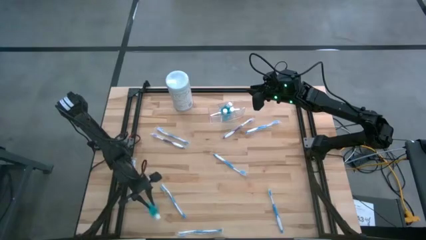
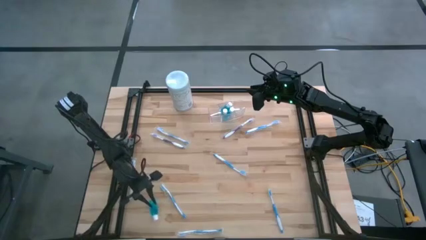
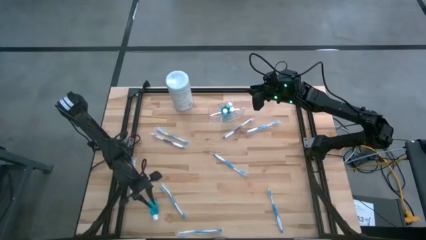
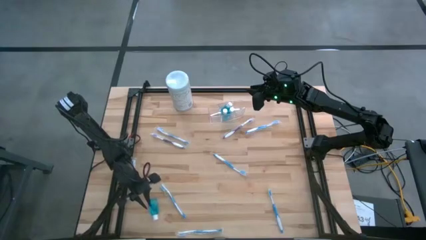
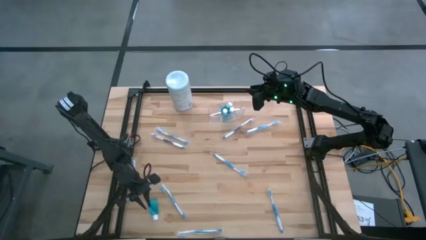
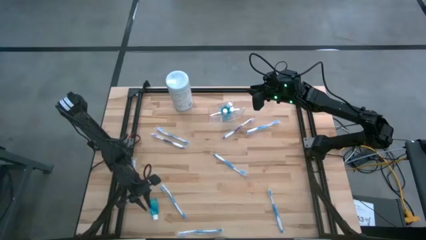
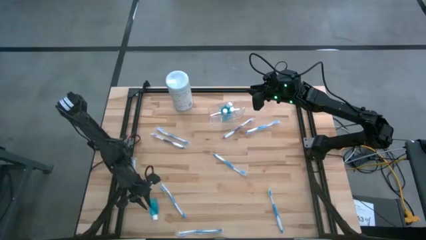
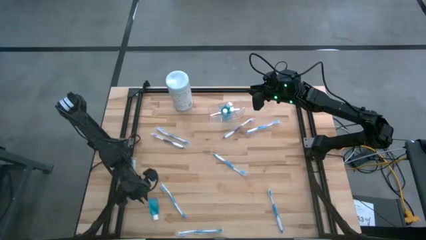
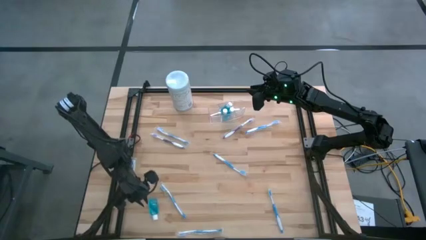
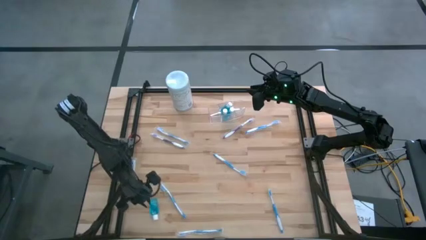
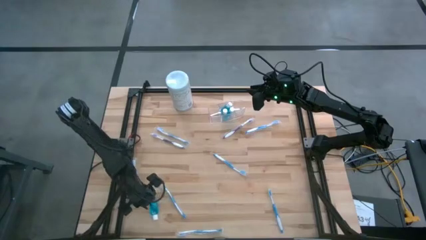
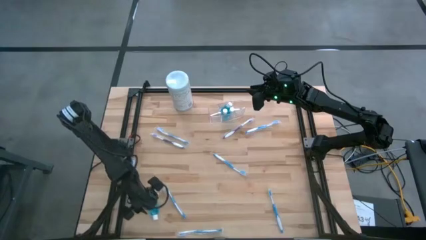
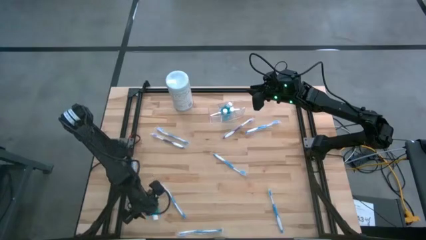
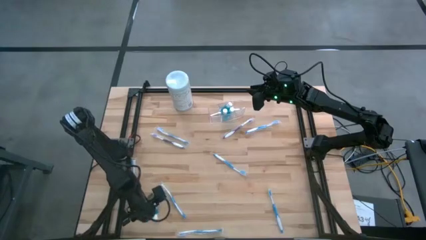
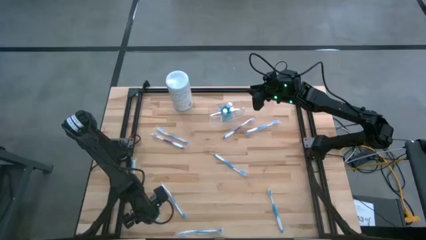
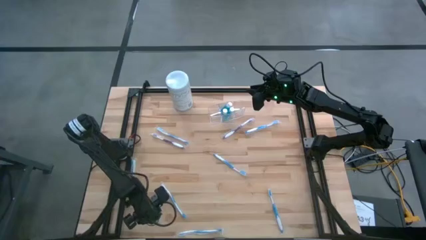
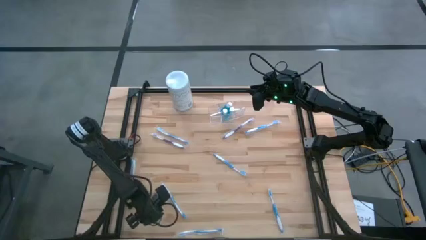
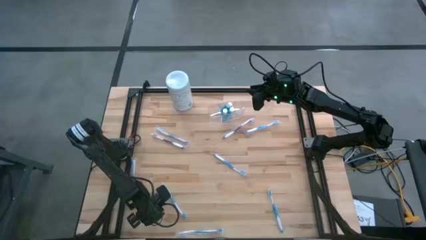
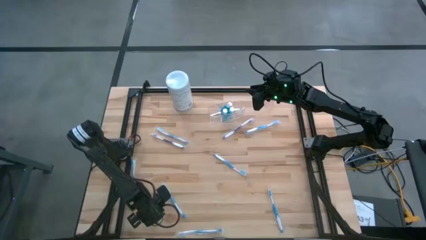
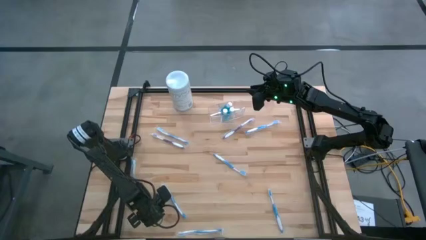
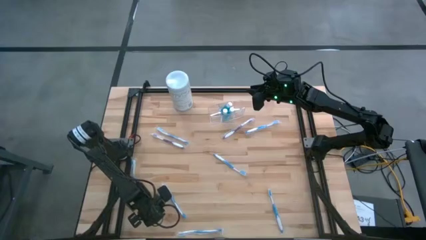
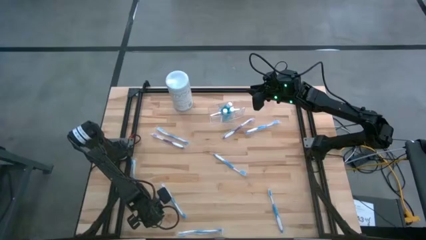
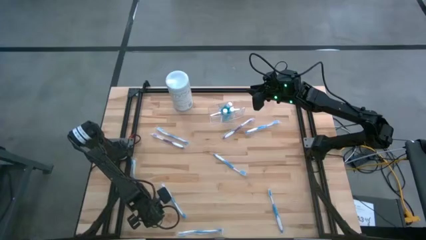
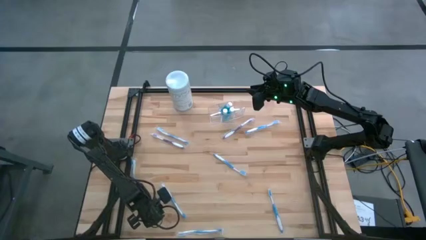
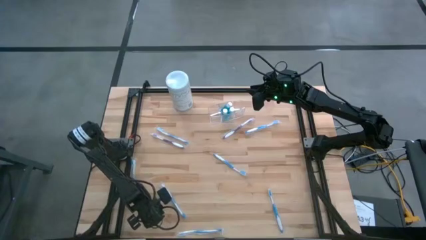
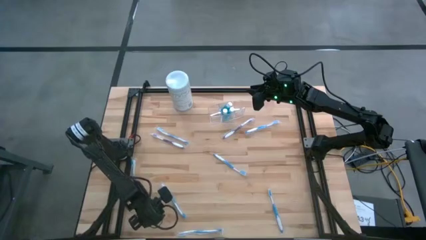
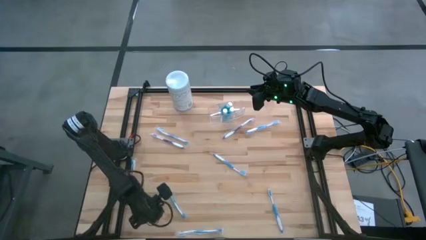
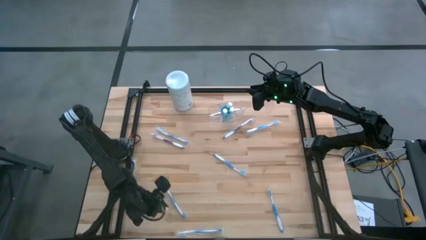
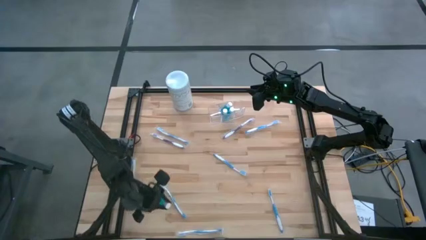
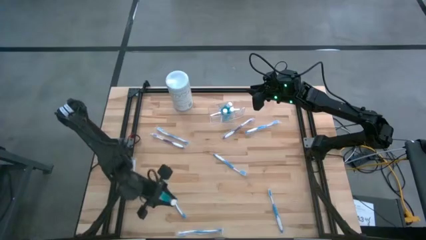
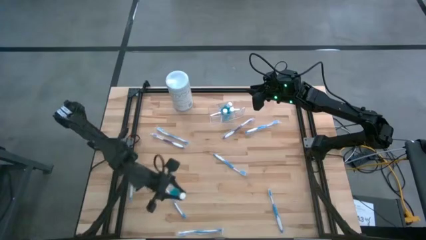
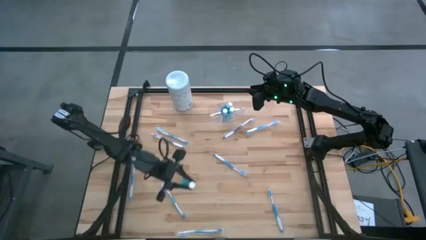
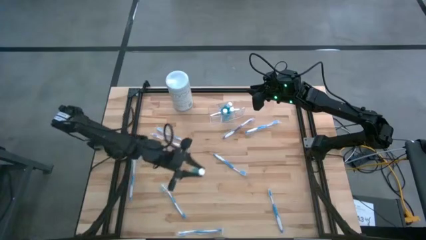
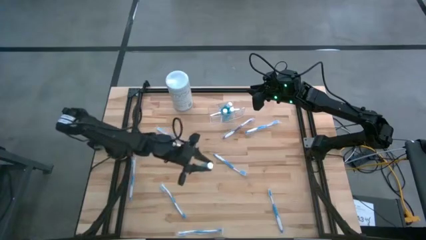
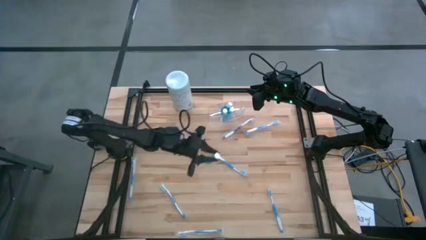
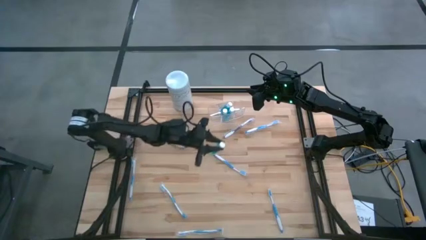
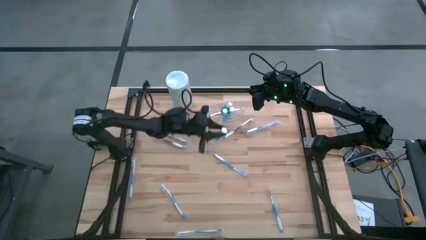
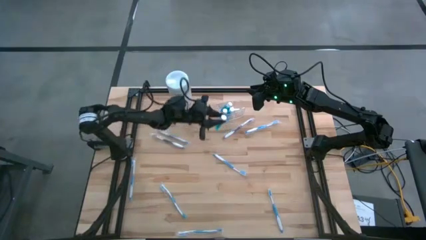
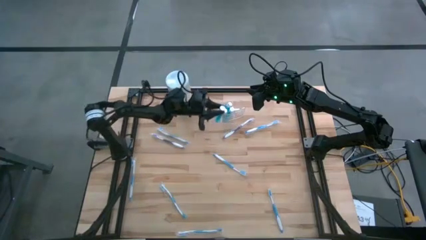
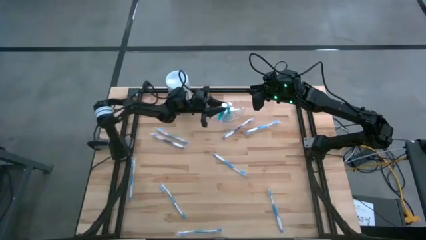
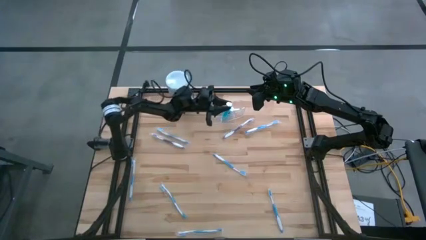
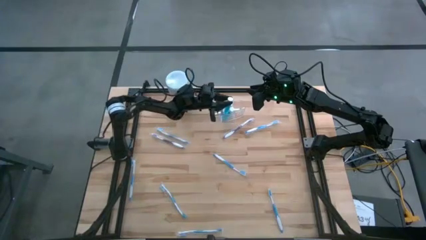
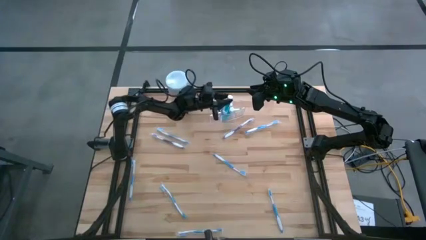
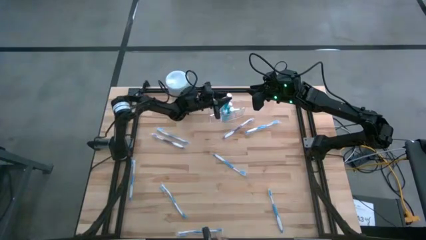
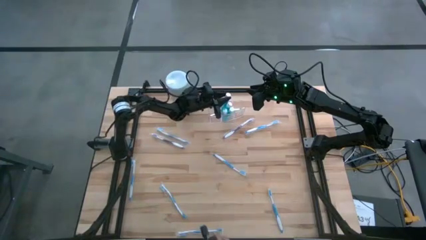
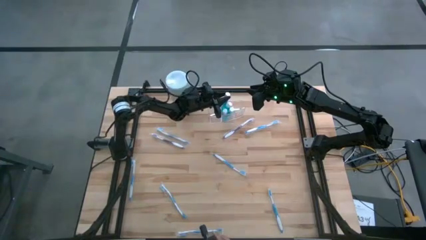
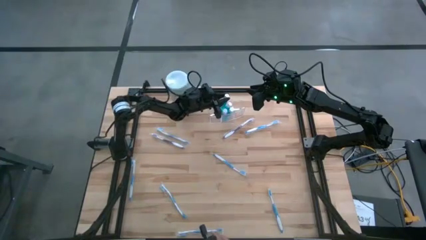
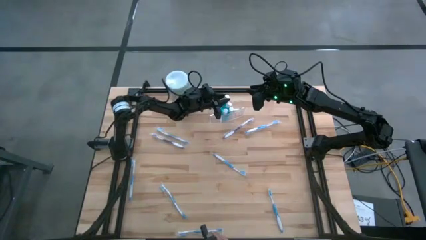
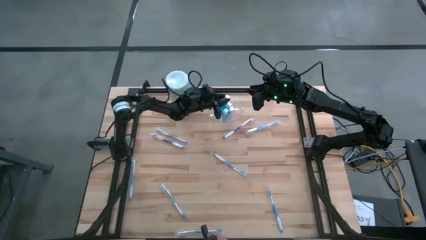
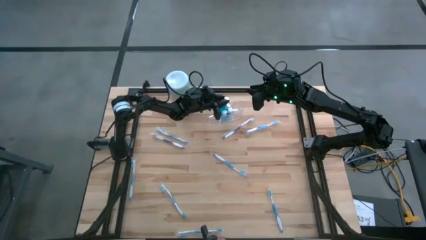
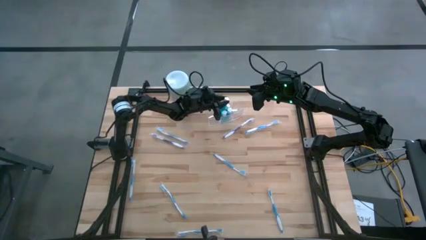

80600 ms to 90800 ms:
Task: Pick & Place toothbrushing station
Put the blue mouthwash into the middle of the transparent organizer with the other blue mouthwash

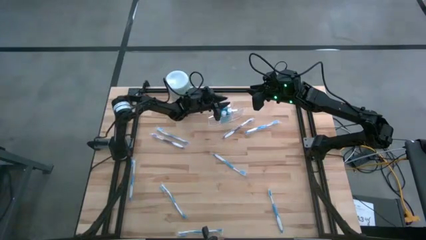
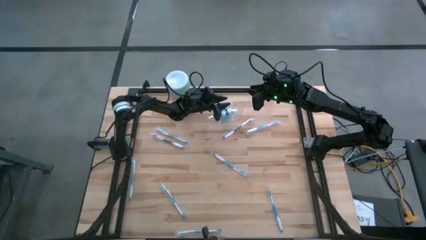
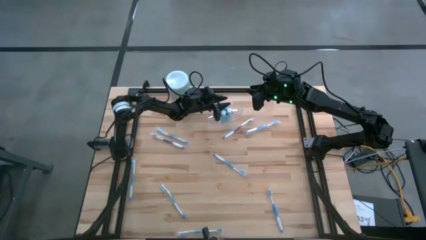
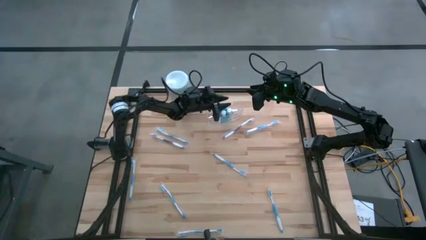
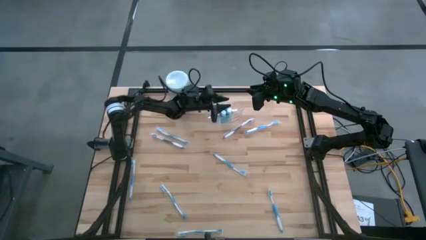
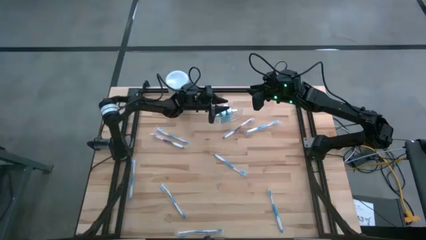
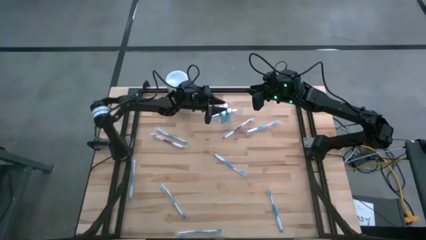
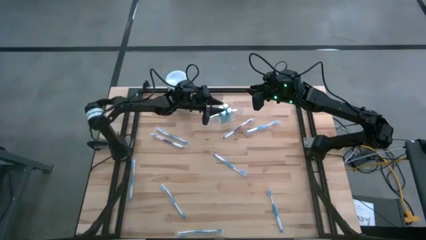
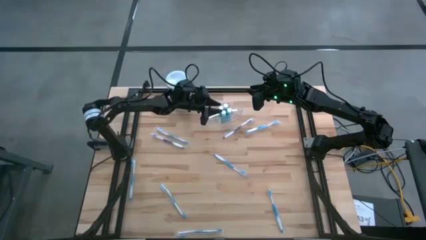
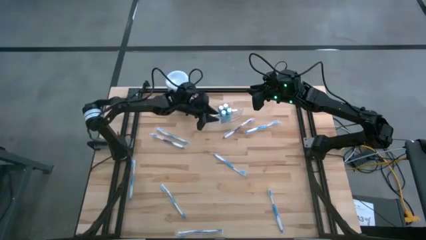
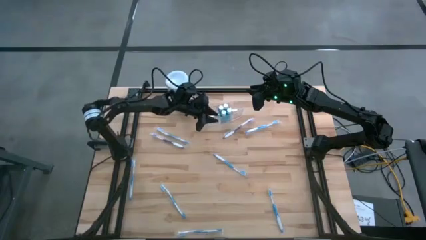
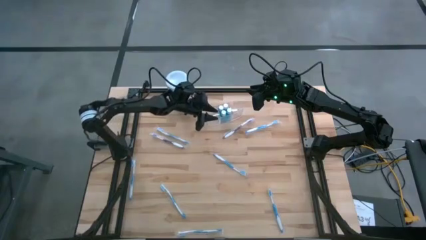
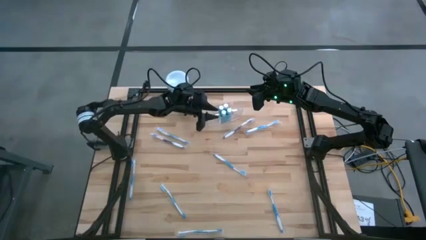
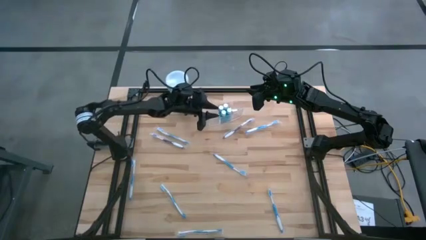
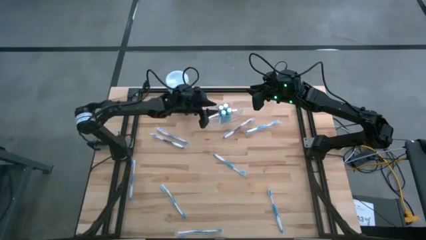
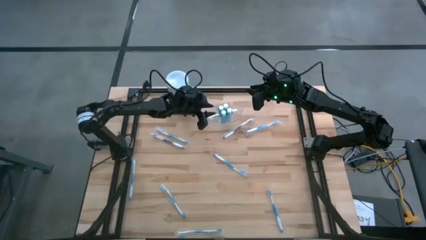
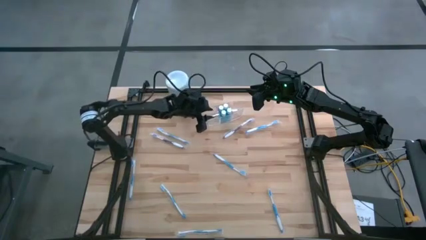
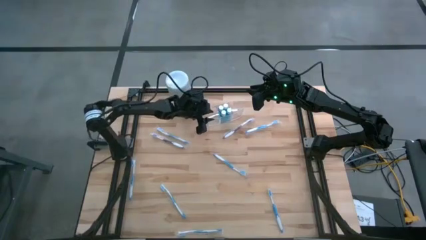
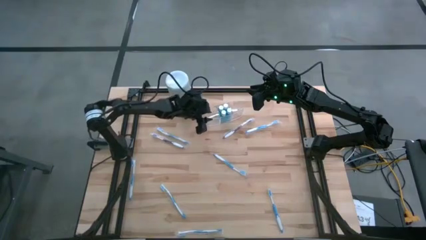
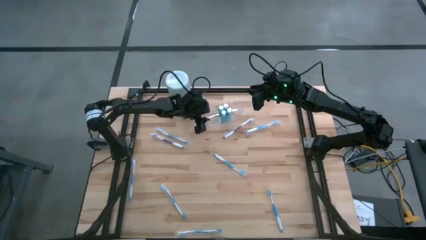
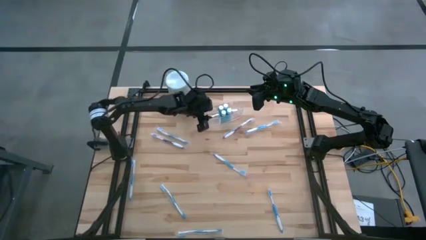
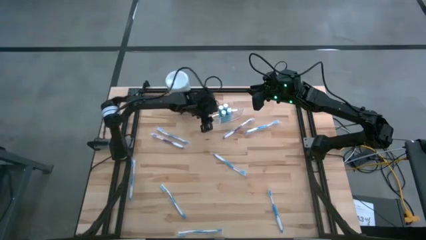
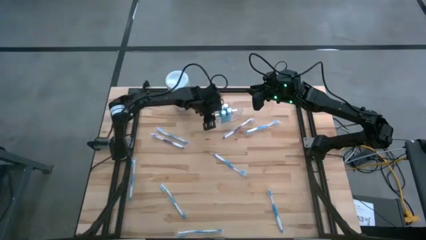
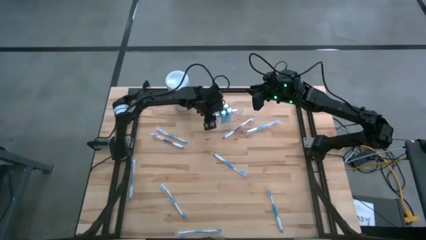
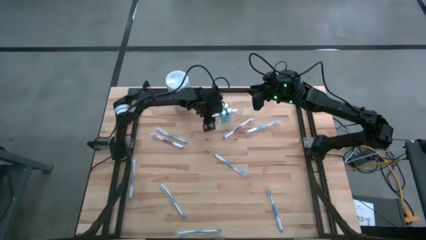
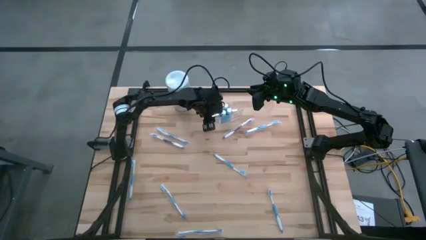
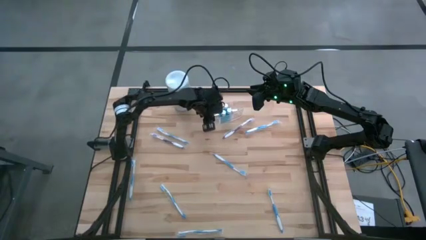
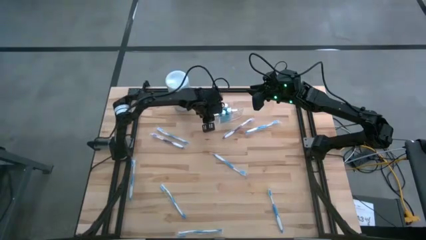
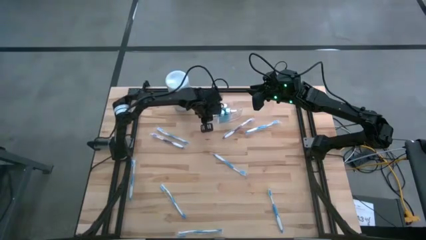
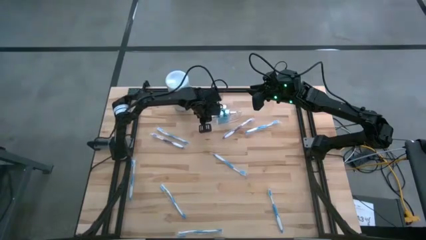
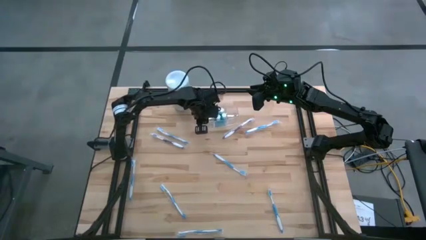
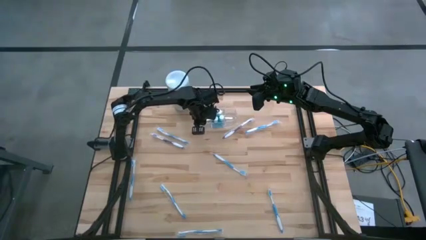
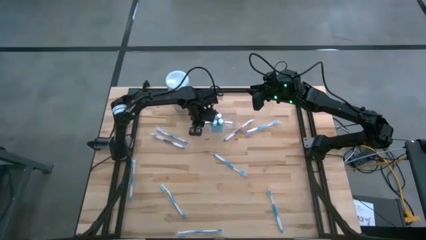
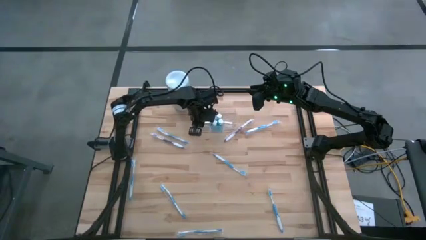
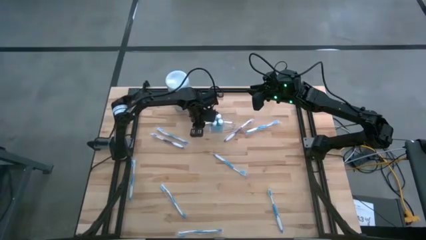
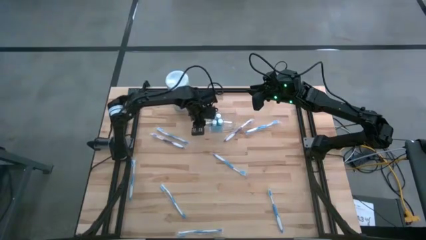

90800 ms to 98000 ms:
Adjust the transparent organizer
